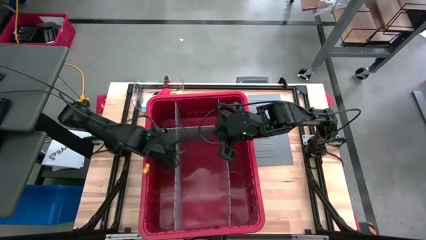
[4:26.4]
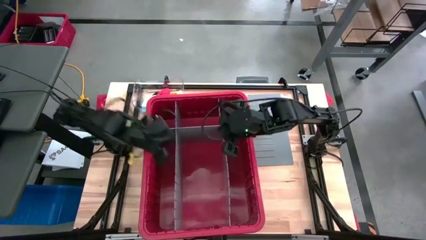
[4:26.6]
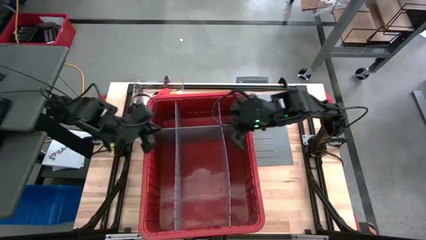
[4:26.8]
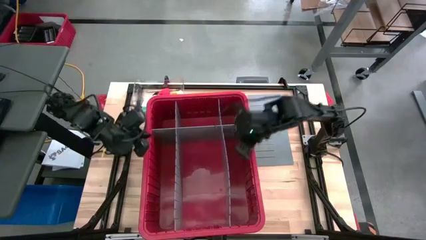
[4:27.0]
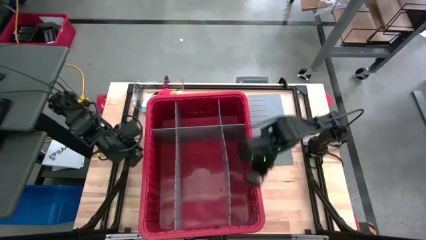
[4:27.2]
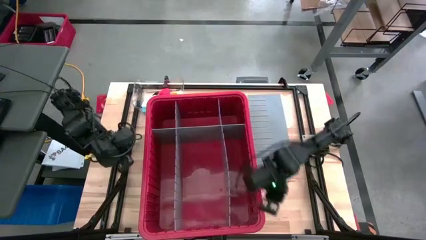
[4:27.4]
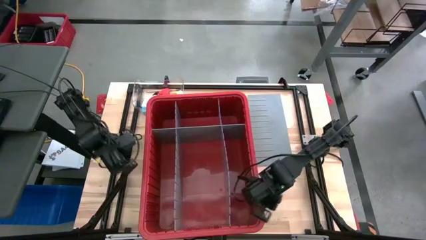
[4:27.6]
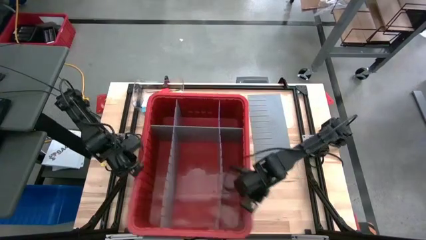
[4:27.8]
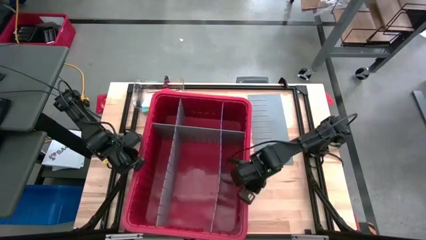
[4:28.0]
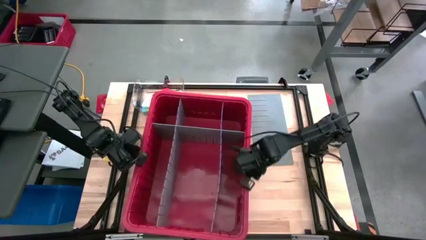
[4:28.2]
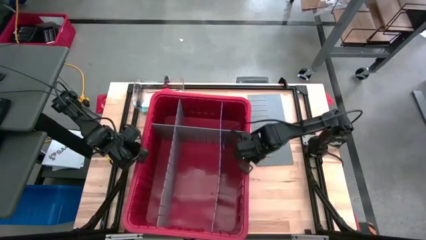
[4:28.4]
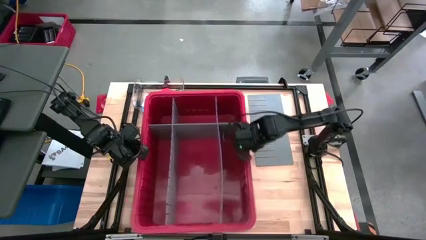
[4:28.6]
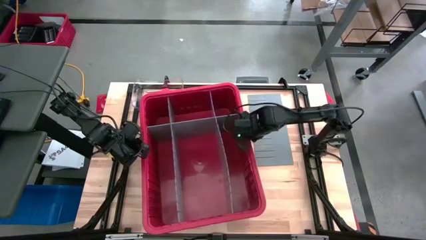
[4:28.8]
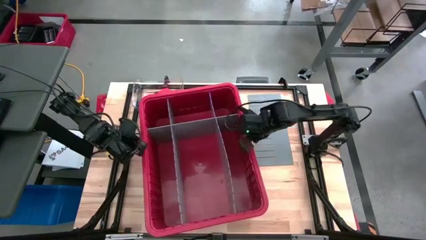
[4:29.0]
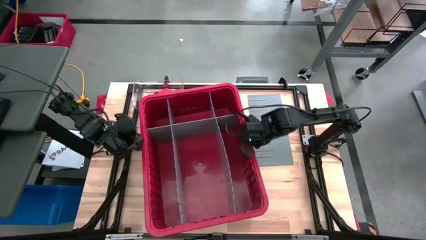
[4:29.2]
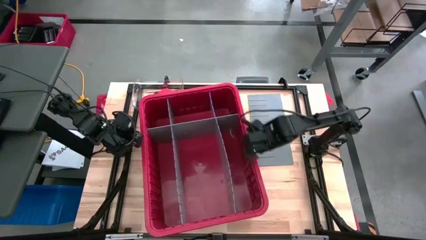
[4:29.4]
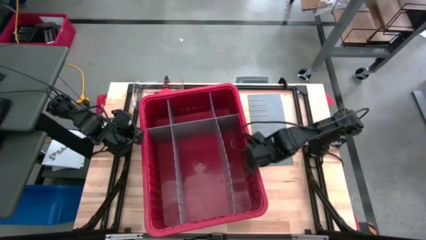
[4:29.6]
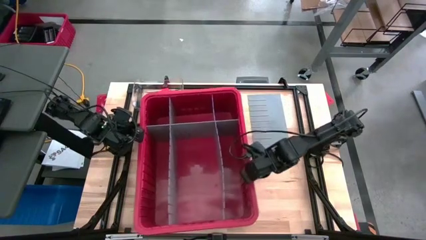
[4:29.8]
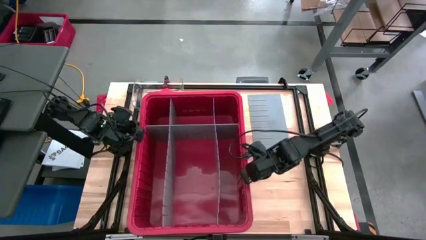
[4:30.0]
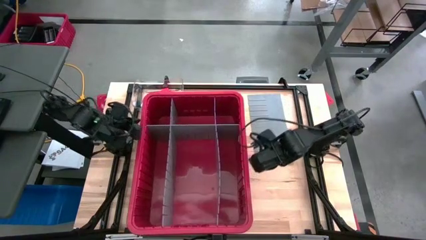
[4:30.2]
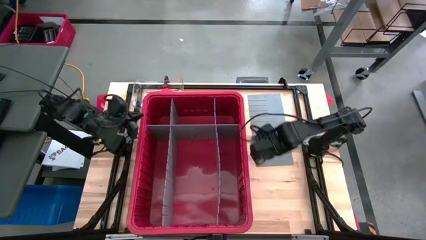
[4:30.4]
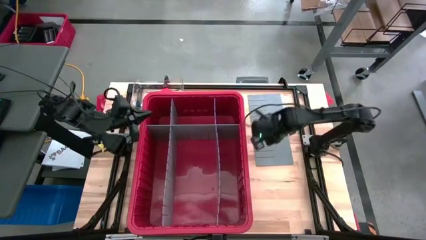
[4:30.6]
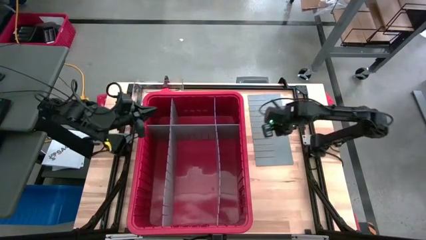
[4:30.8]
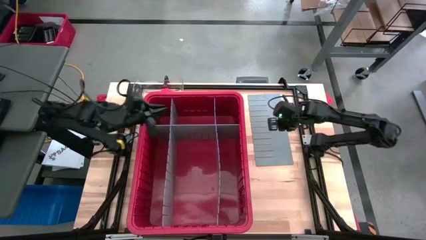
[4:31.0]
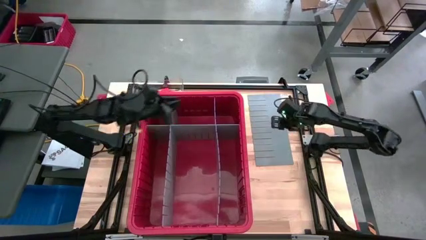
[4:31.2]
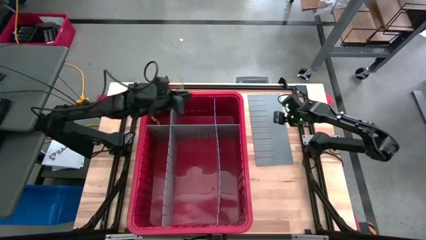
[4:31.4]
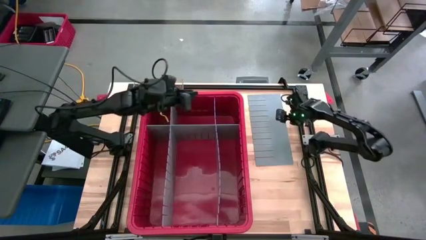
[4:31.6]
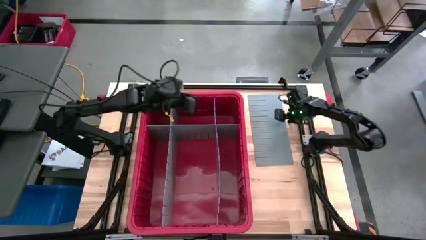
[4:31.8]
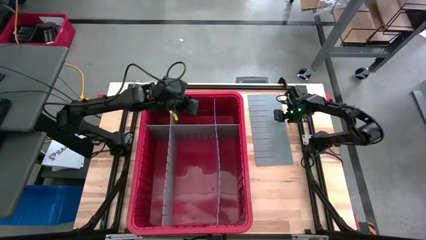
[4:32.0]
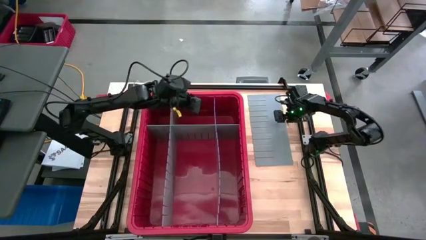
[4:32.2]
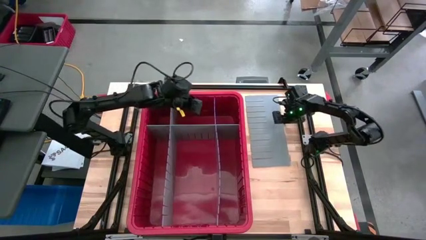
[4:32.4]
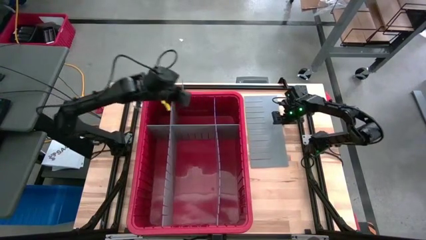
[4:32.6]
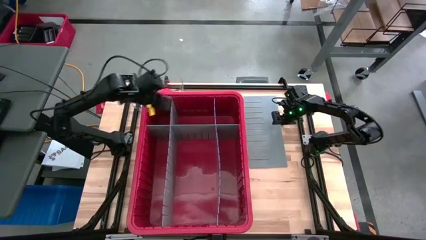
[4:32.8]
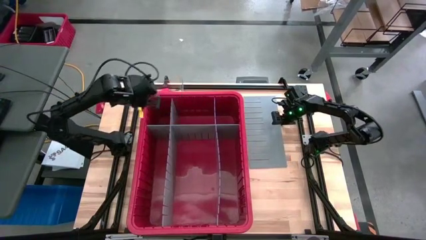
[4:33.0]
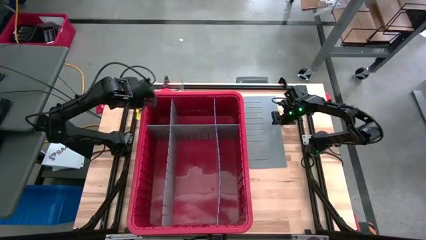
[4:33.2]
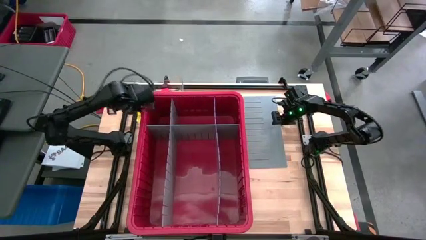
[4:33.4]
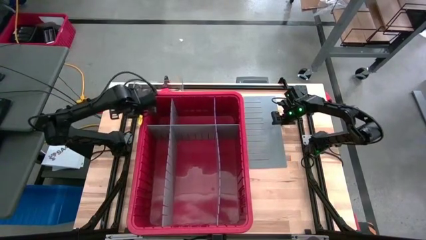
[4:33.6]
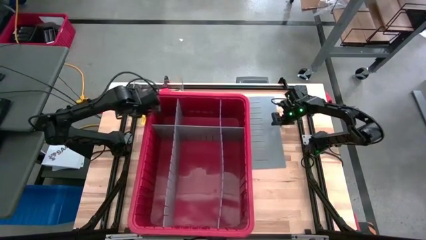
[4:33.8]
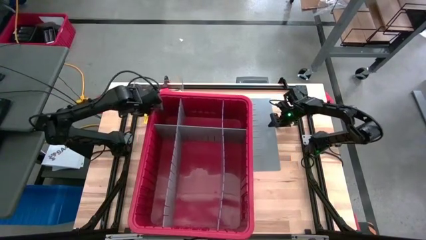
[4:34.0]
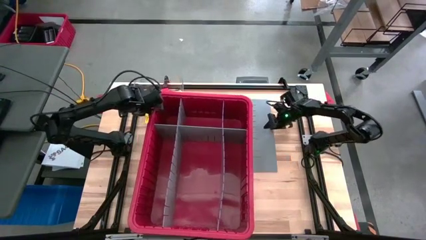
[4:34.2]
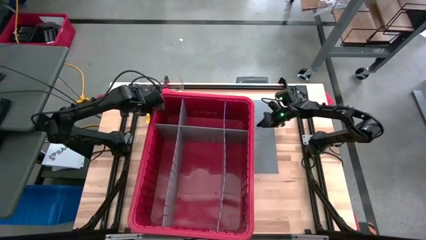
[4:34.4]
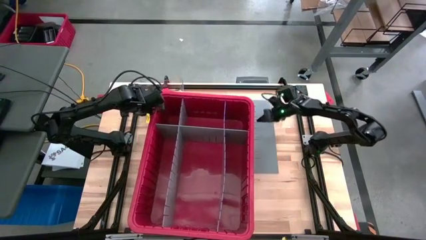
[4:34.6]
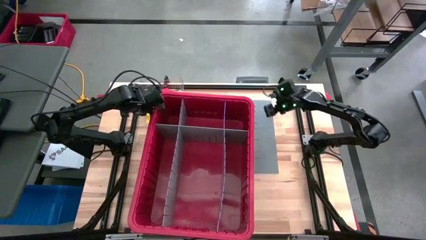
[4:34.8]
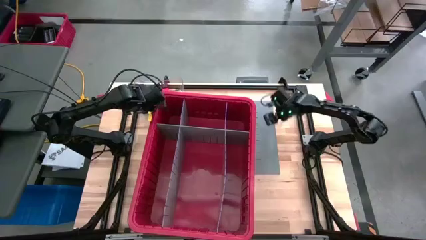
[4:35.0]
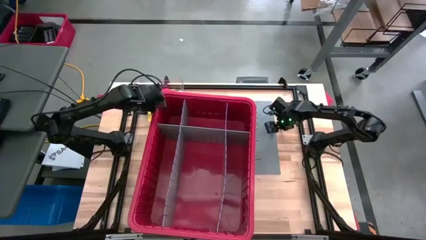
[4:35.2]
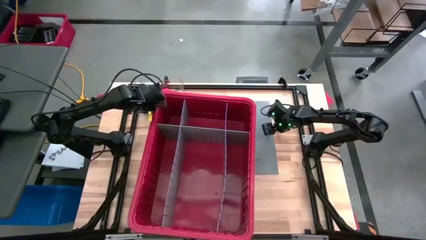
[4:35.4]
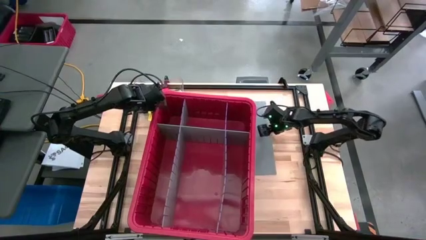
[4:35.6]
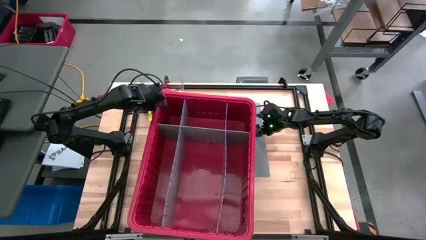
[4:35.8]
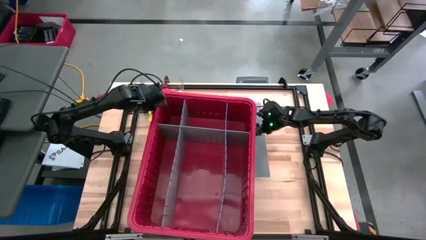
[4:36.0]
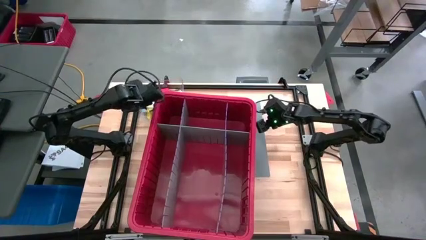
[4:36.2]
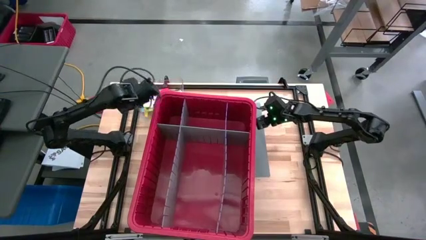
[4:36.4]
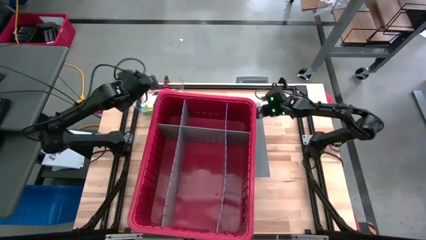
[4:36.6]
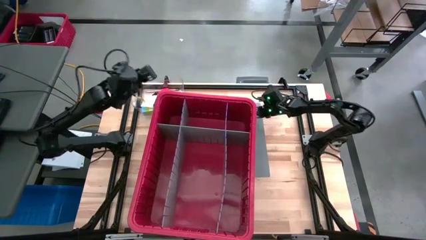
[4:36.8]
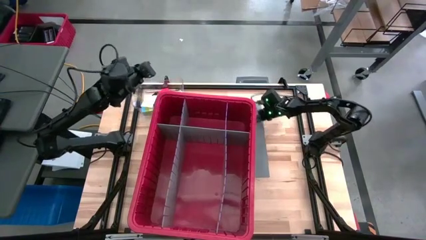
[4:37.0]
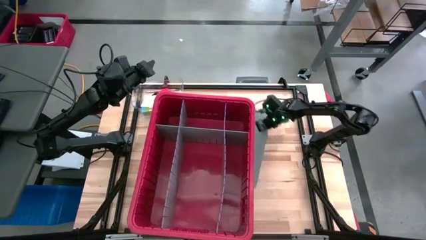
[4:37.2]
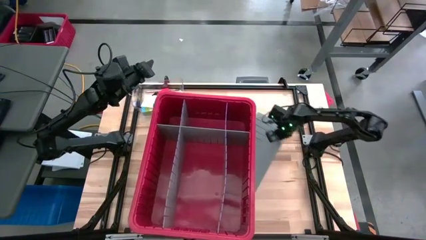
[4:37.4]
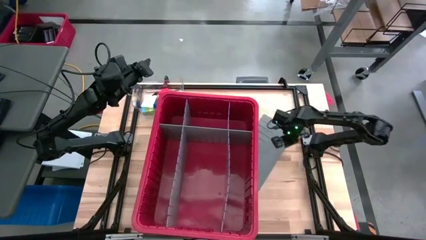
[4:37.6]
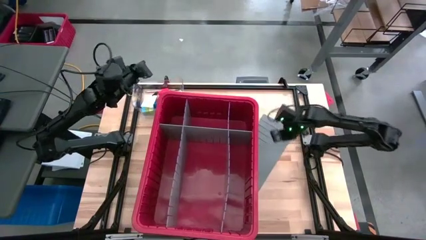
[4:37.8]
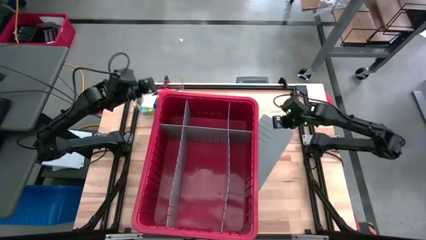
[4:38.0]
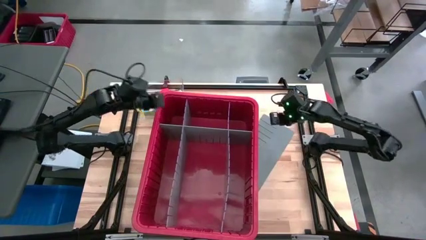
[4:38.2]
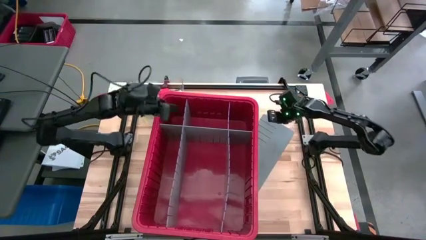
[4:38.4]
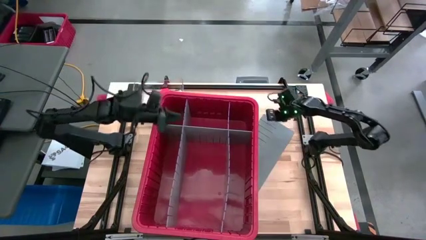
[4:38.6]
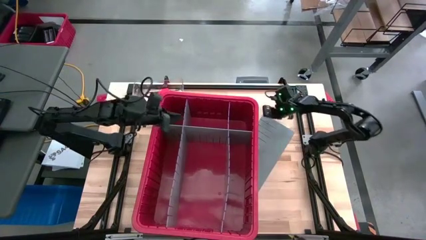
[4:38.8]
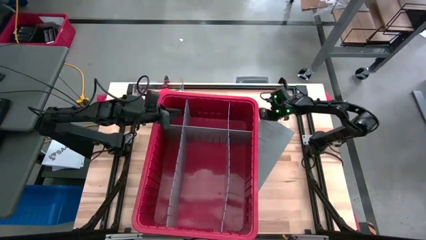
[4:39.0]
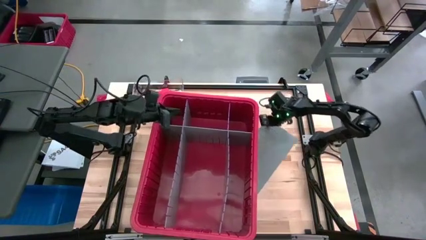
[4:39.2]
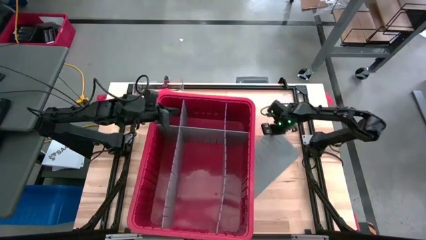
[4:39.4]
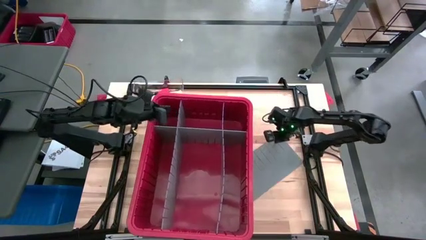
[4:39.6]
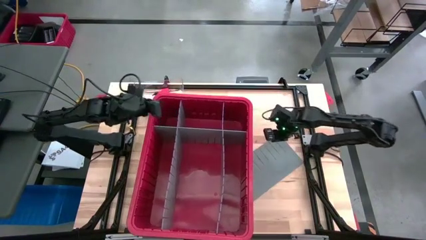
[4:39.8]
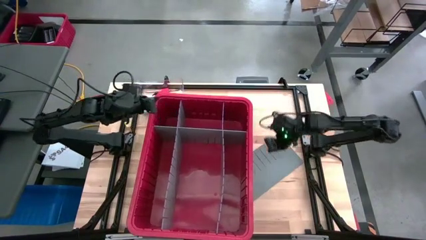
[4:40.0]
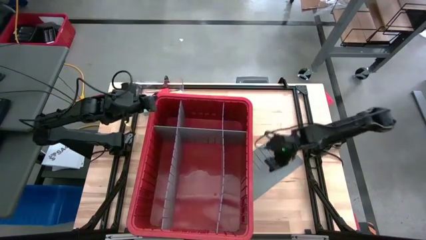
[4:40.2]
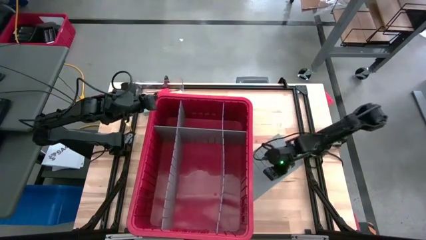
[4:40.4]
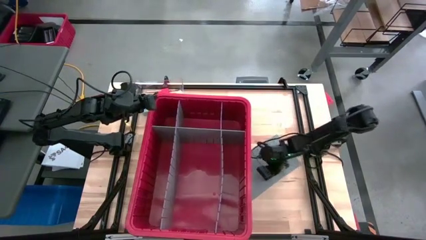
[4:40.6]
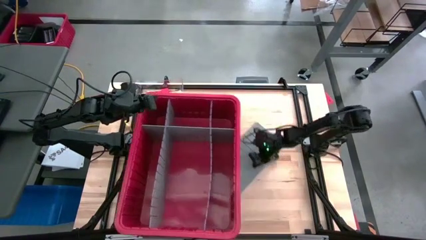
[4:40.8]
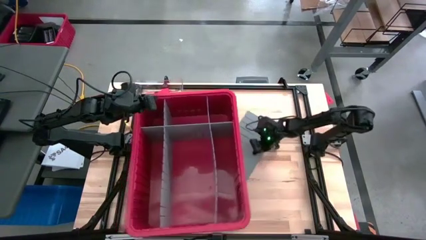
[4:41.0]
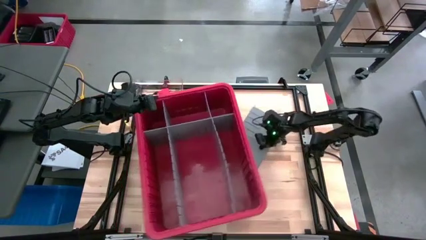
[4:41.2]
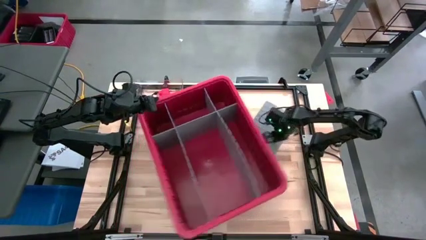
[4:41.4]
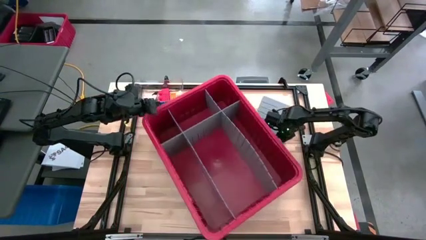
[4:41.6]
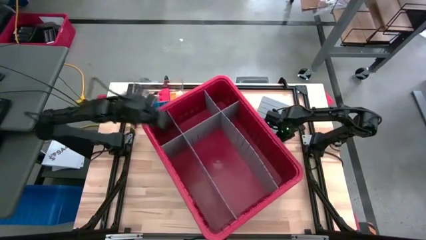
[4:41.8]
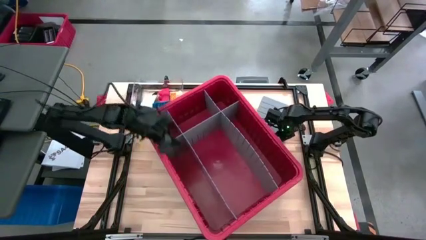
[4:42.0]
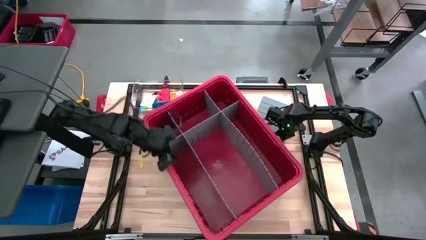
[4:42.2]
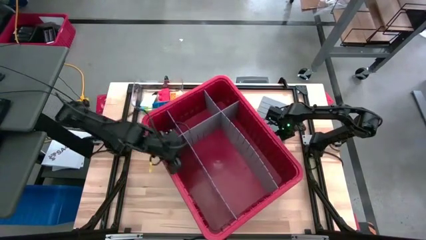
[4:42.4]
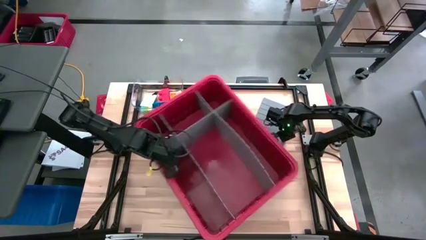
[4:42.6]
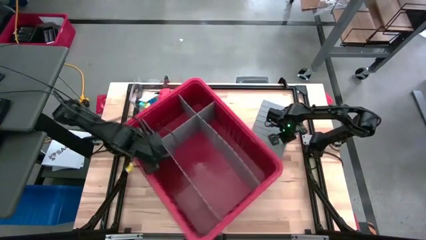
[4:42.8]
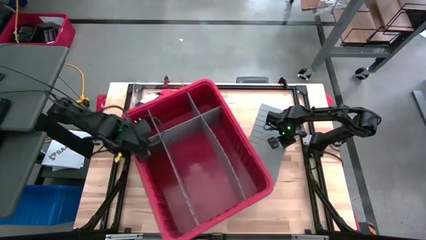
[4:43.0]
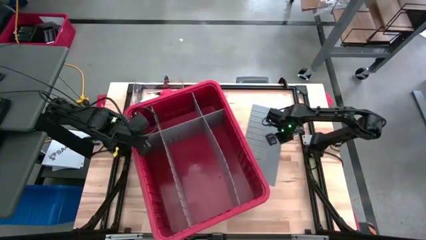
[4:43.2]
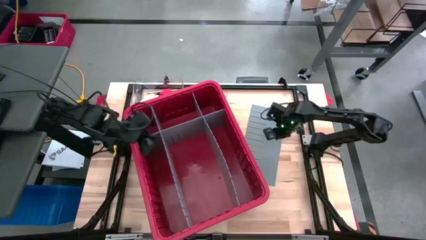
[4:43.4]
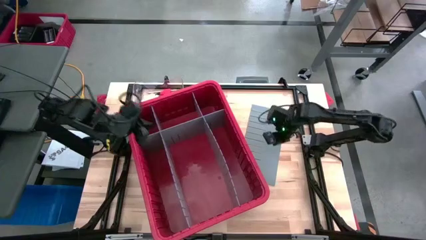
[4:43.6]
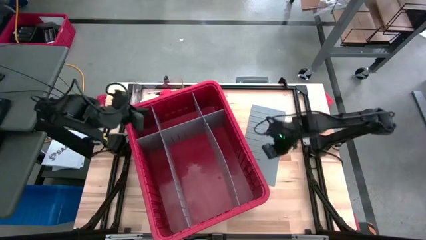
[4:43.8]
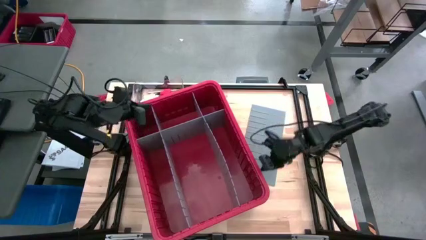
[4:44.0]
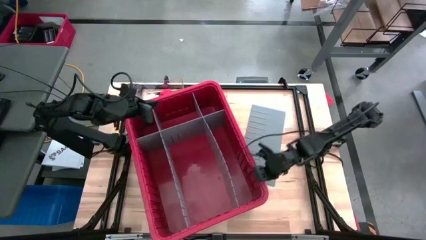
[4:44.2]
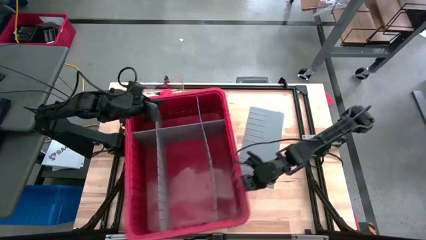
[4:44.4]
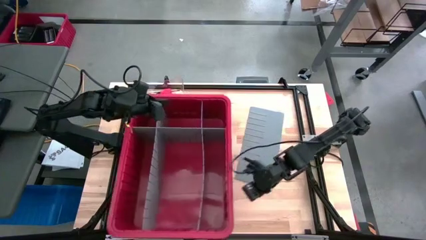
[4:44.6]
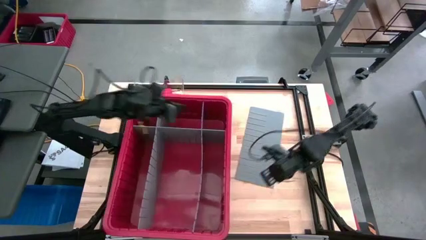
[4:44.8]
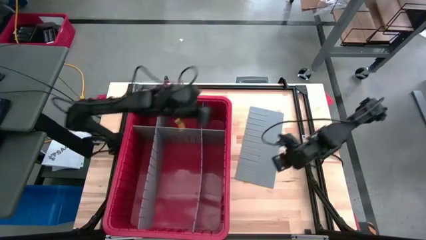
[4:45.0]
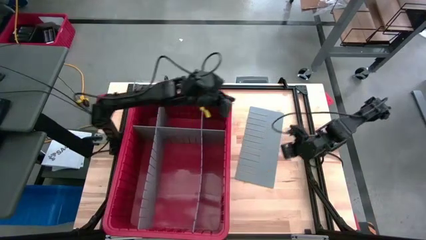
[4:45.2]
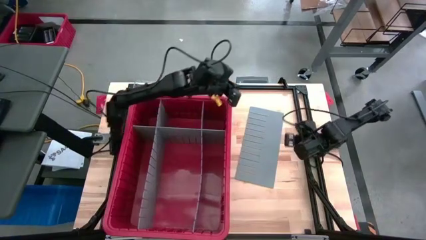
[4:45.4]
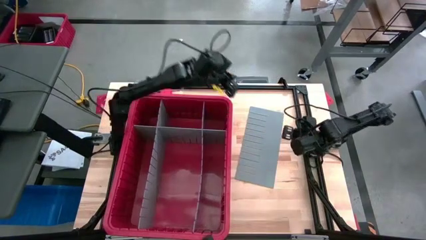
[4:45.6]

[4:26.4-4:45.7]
Task: Sort blocks
Assemble the bin divider into the red bin
